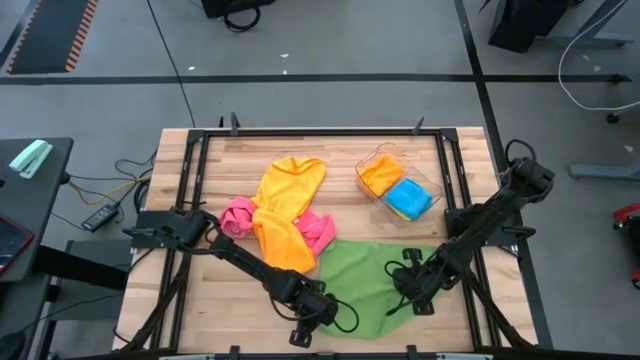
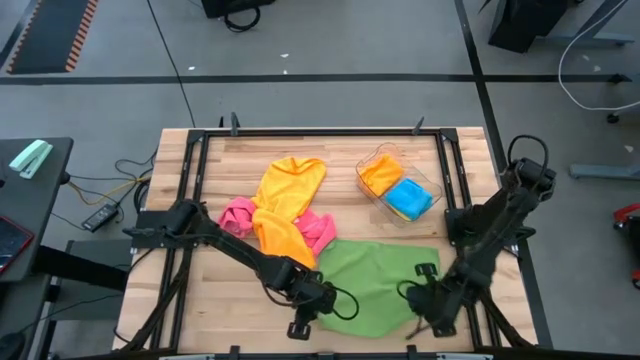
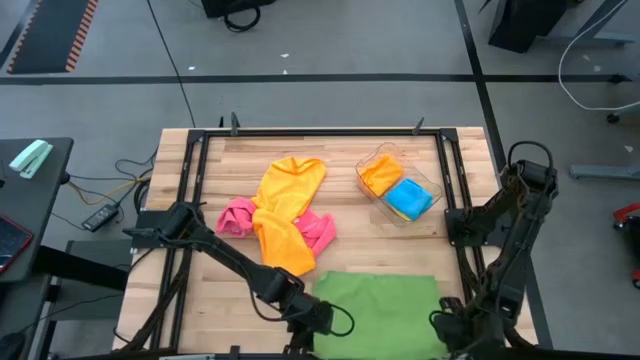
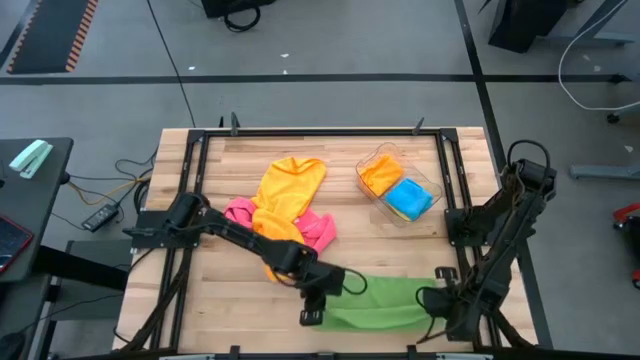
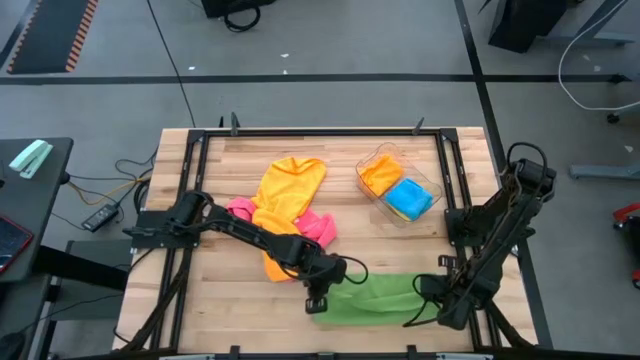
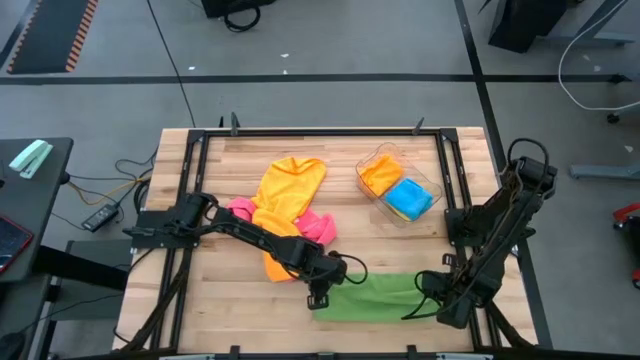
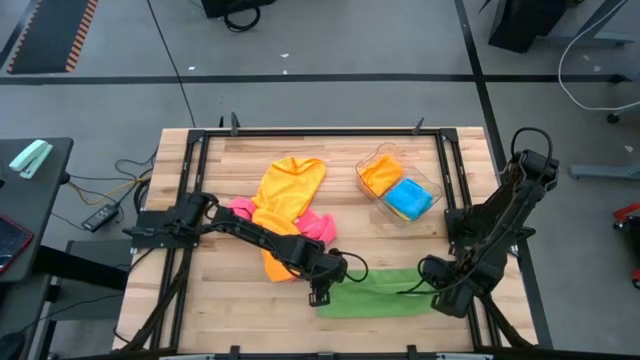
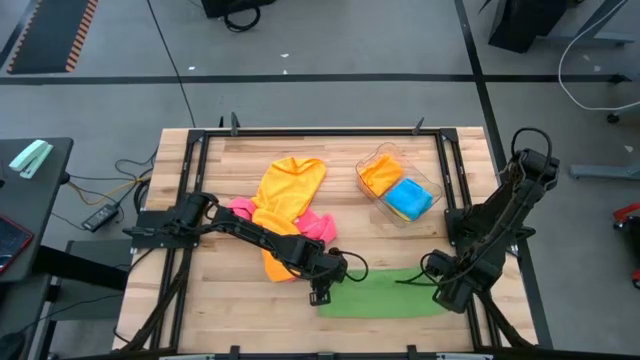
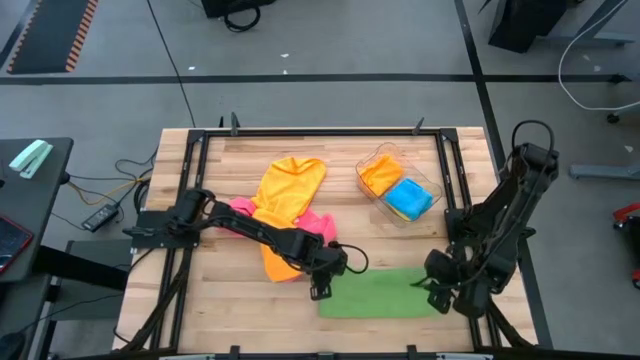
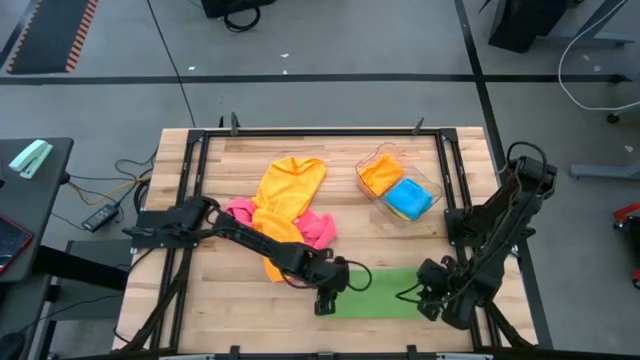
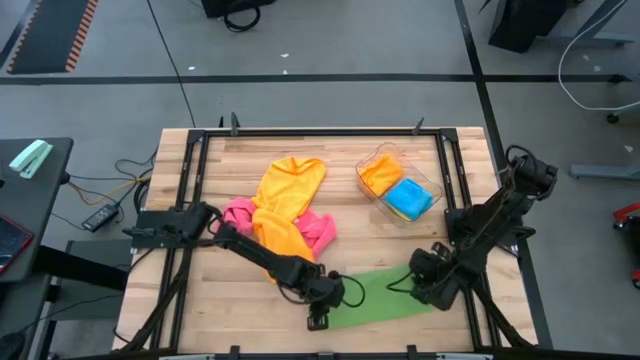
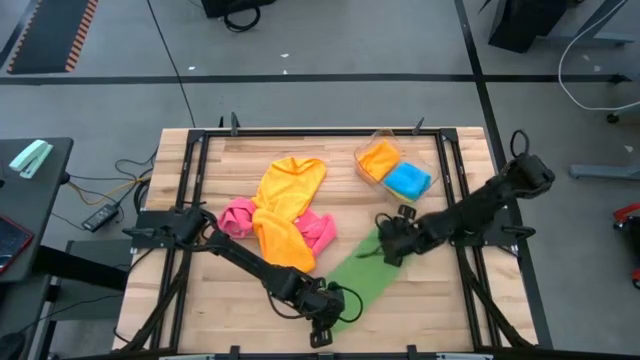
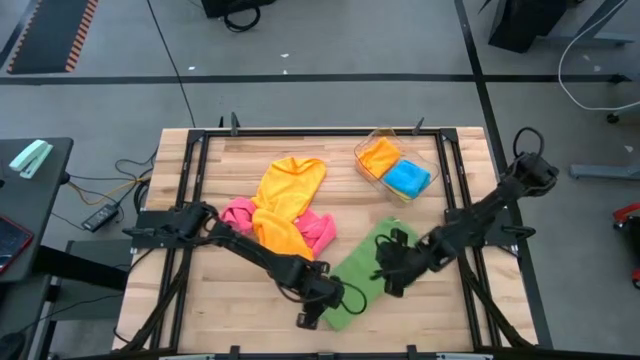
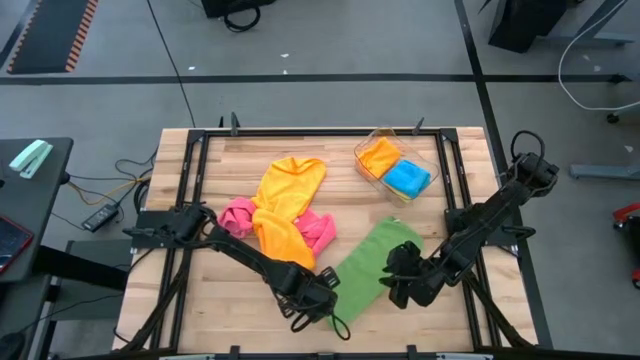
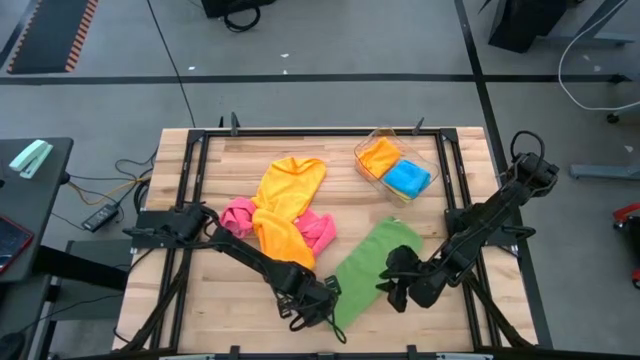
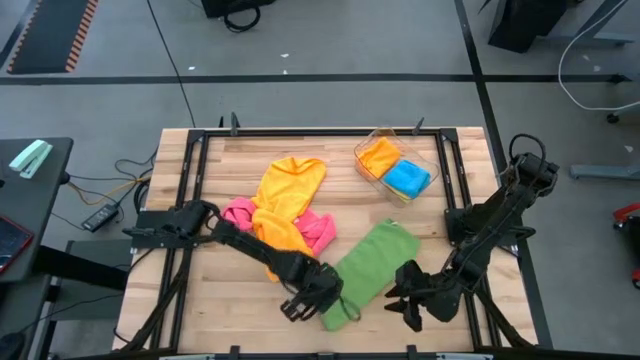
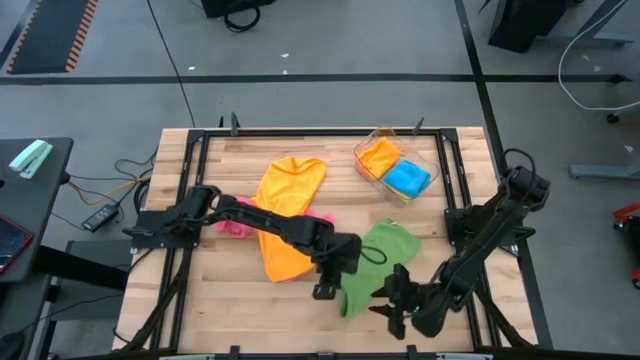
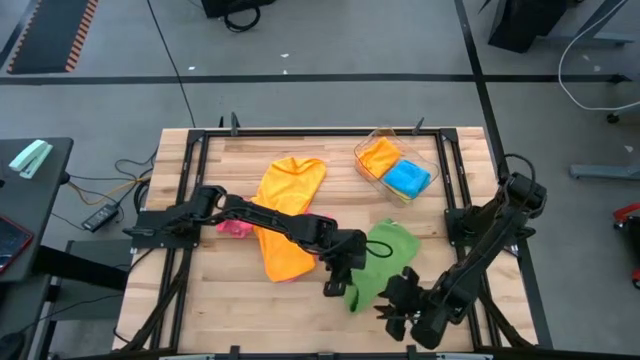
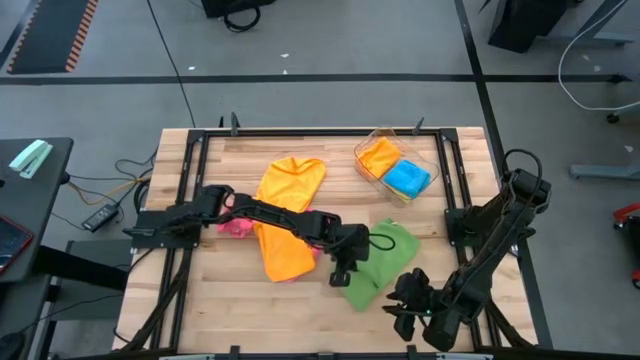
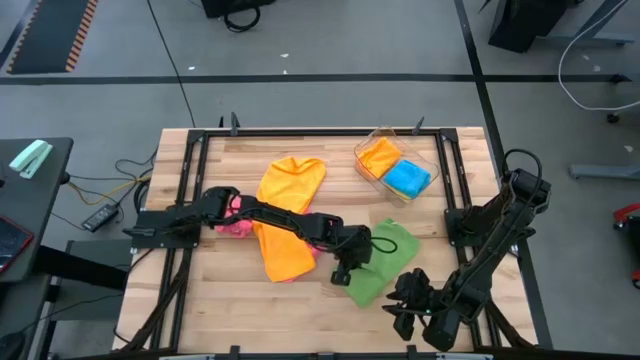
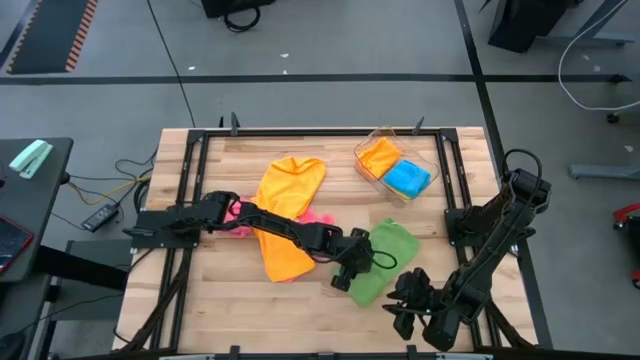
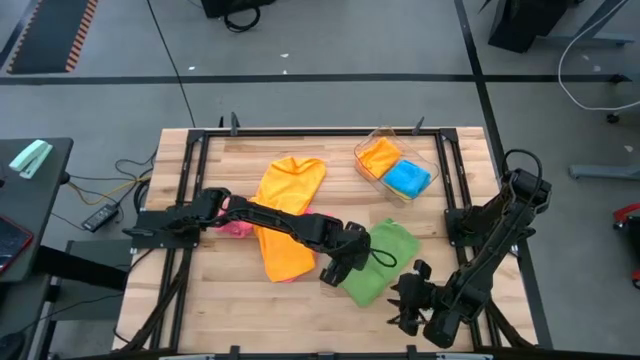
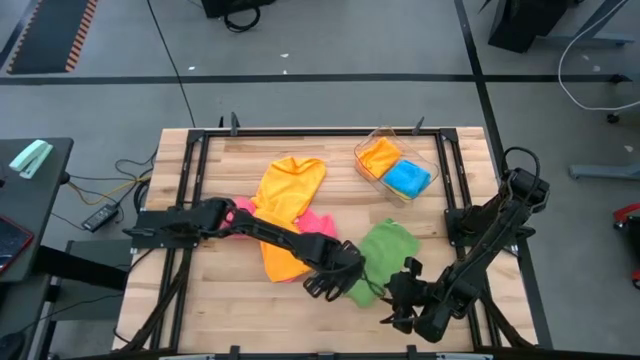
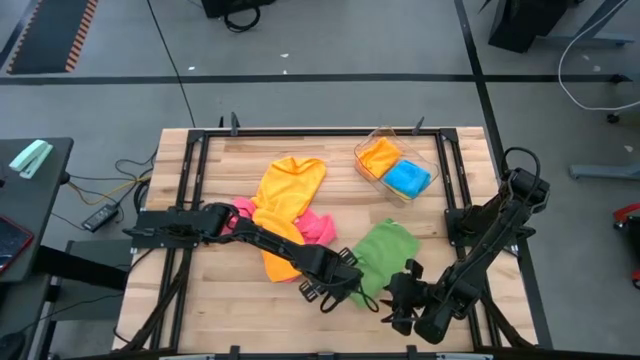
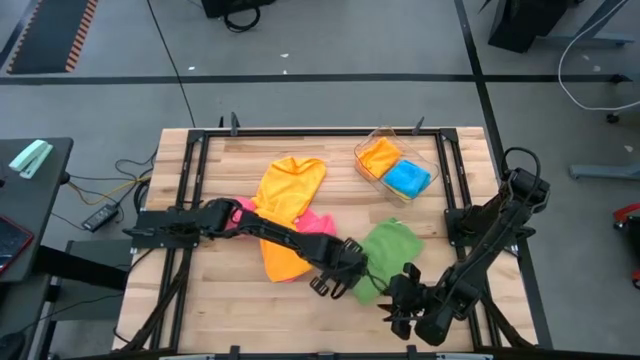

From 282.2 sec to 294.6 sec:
Task: Fold microfiber towels
Fold the green towel

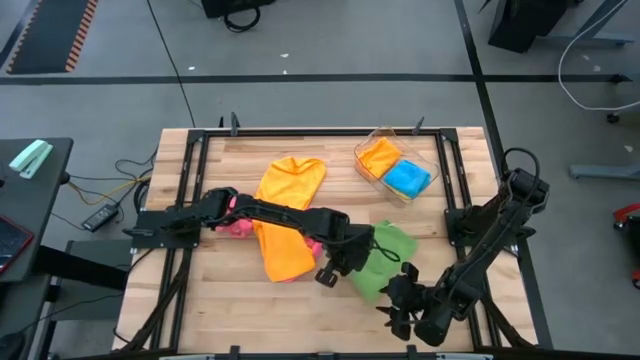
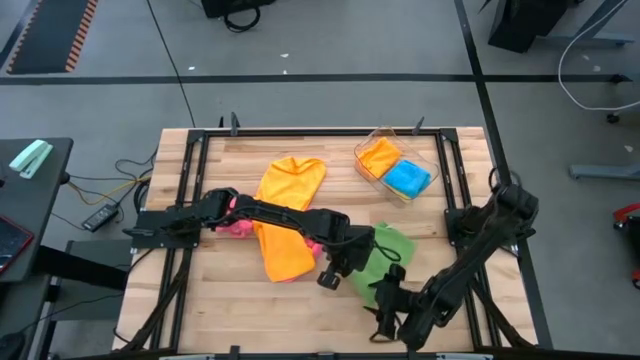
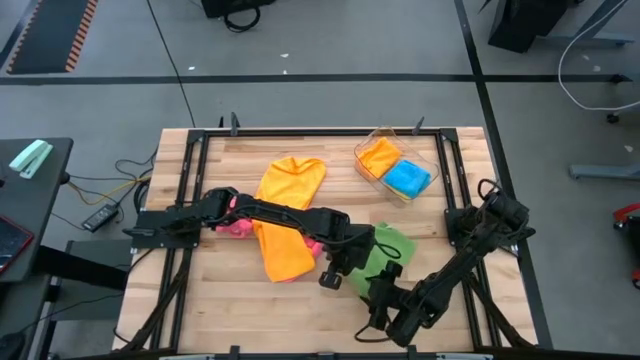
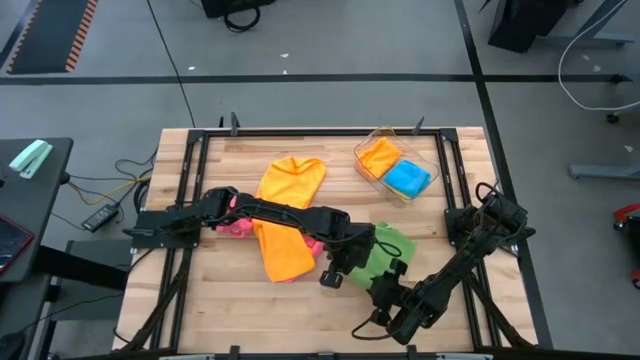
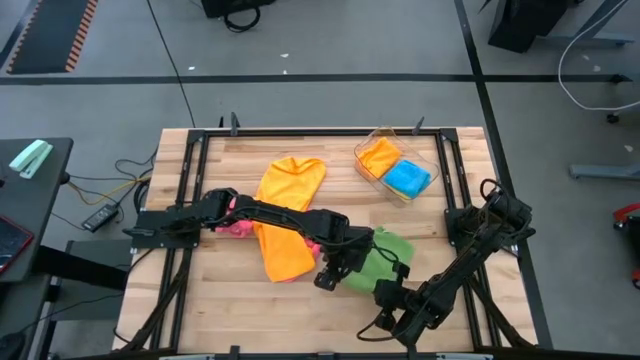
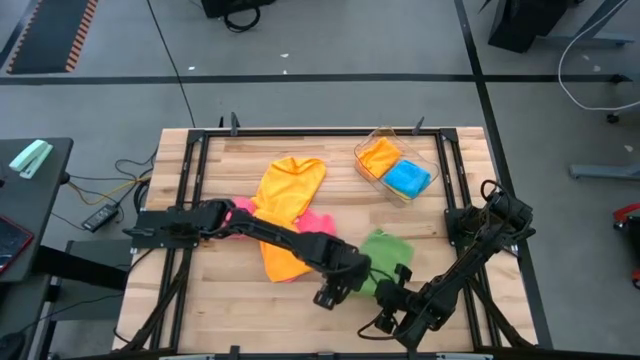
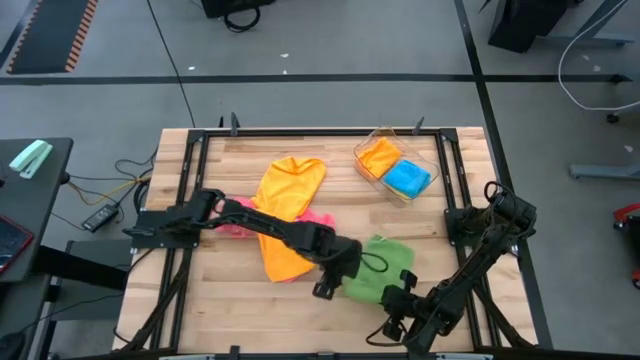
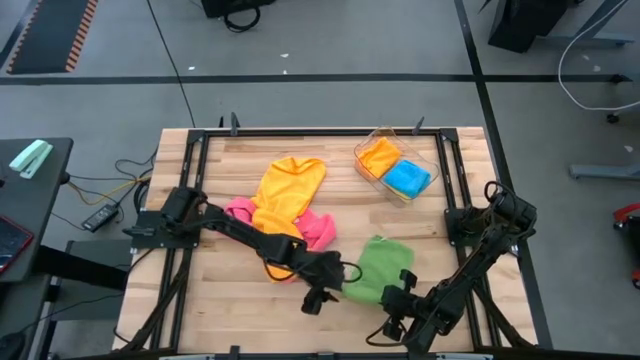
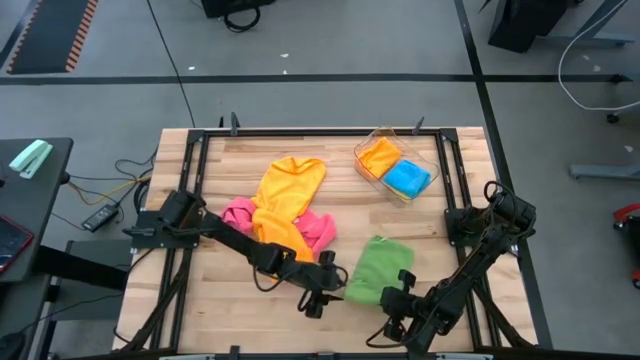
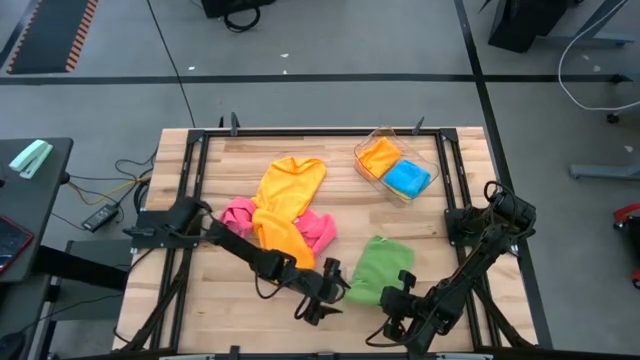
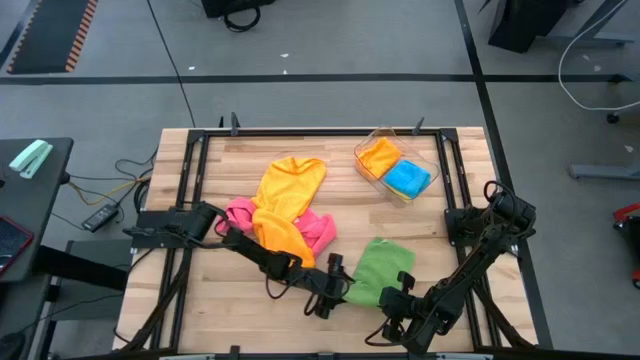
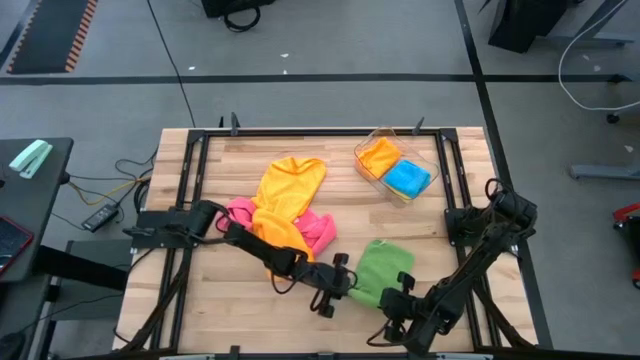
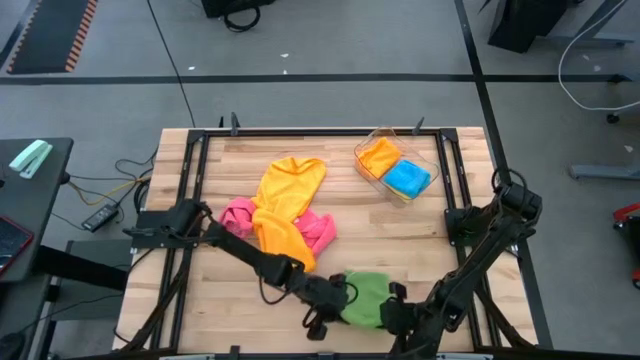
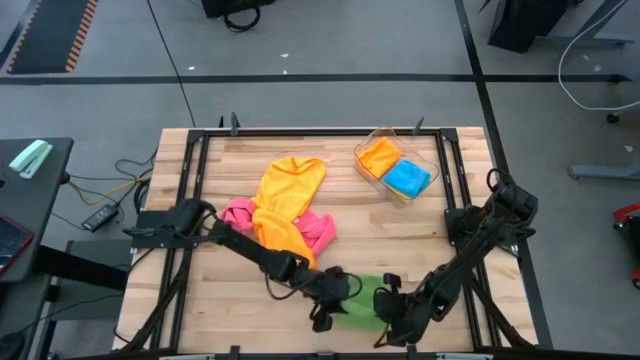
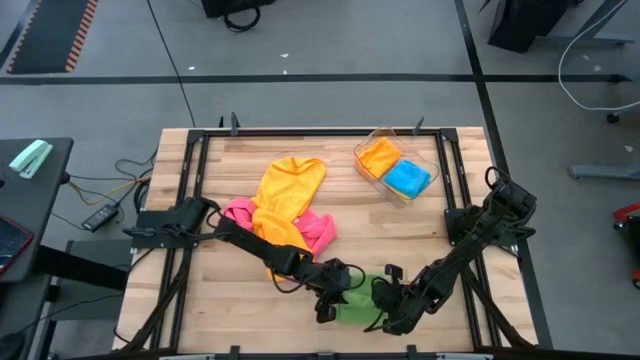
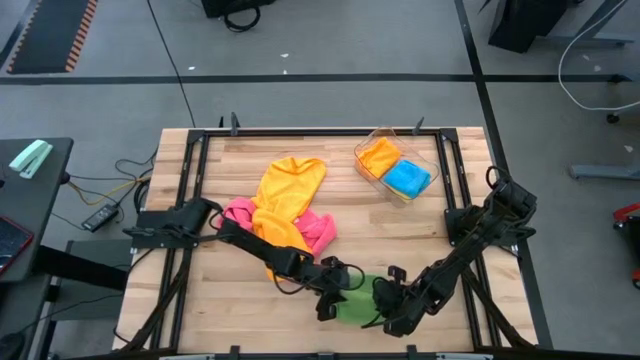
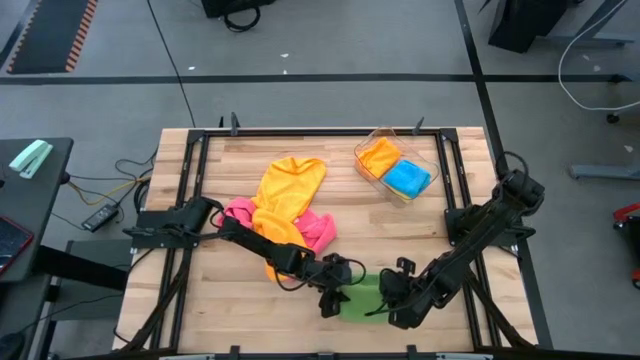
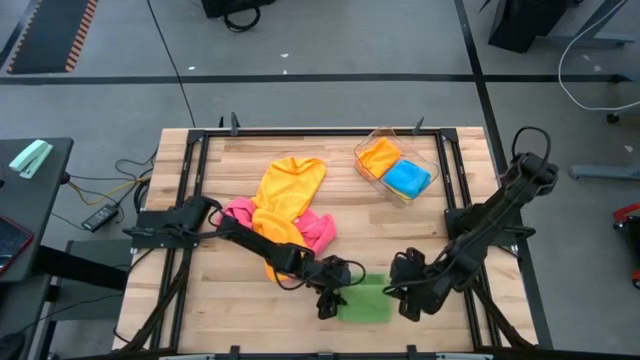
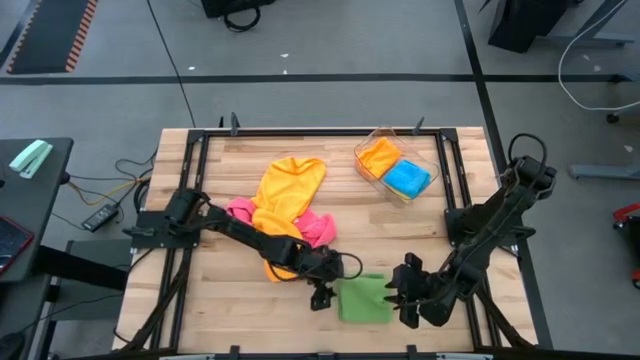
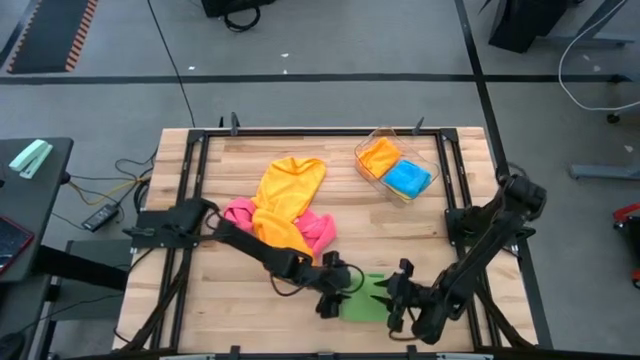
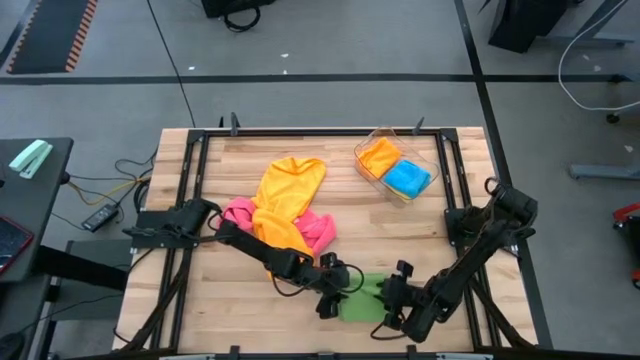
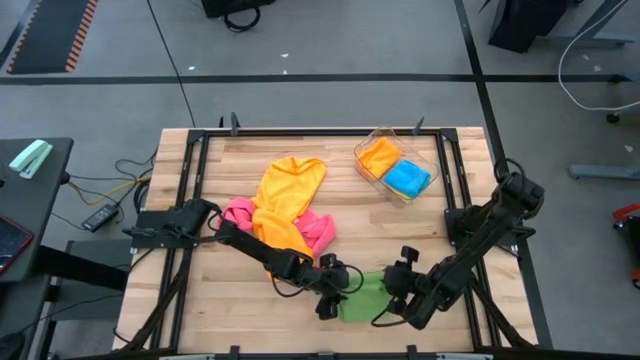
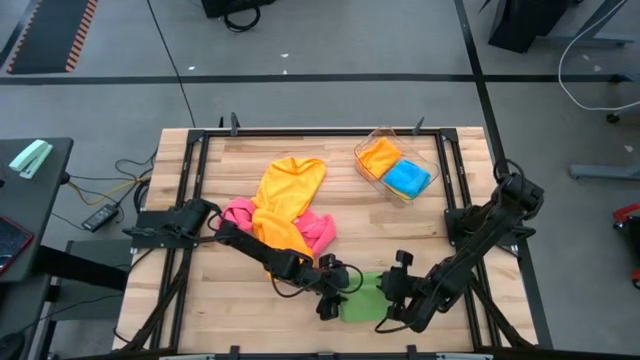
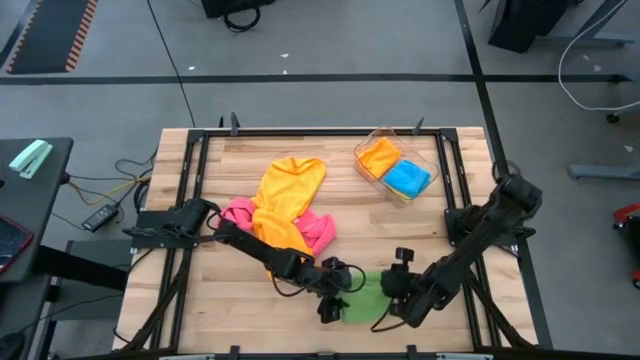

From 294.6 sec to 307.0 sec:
Fold the green towel
